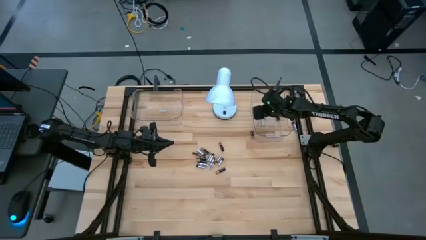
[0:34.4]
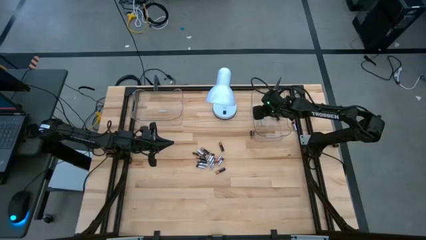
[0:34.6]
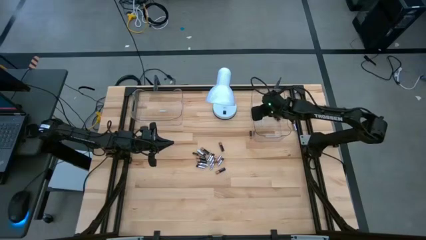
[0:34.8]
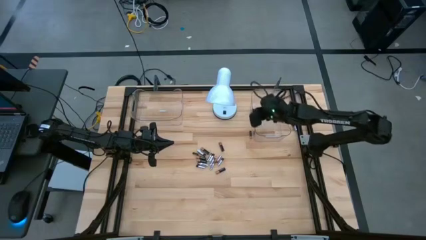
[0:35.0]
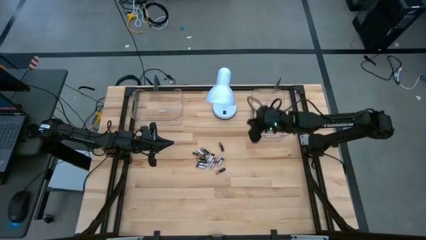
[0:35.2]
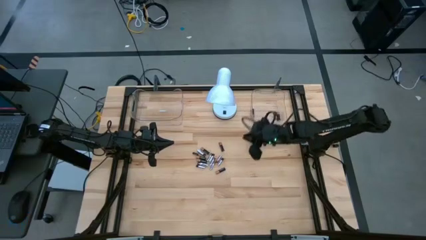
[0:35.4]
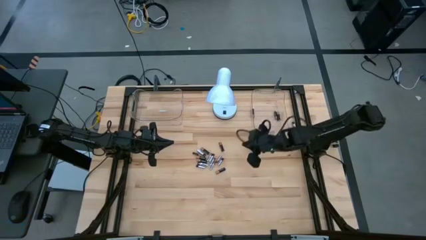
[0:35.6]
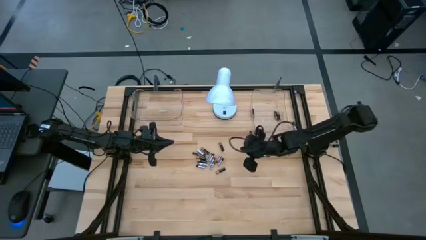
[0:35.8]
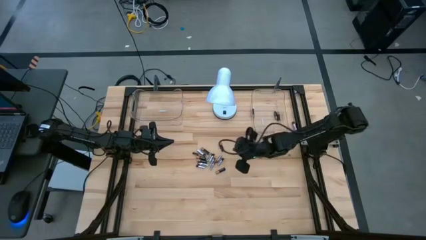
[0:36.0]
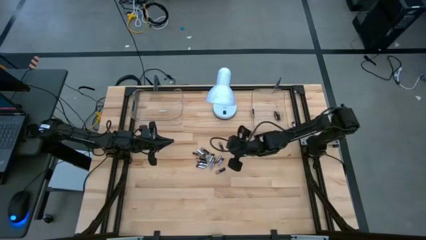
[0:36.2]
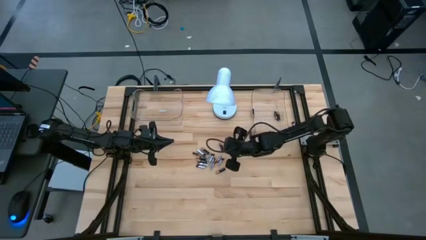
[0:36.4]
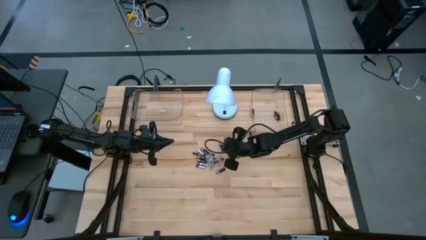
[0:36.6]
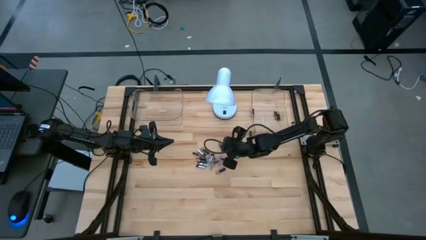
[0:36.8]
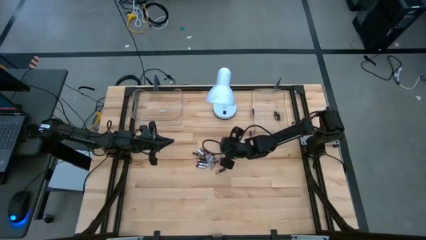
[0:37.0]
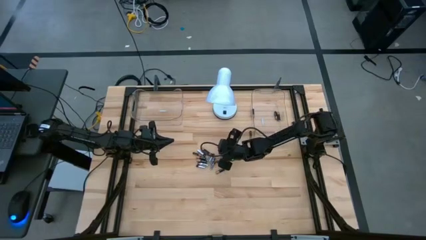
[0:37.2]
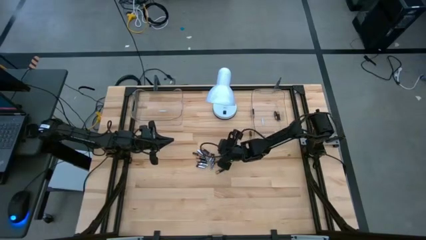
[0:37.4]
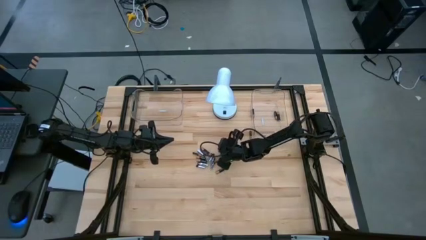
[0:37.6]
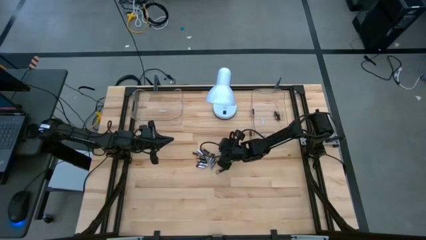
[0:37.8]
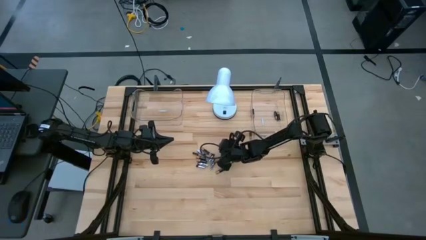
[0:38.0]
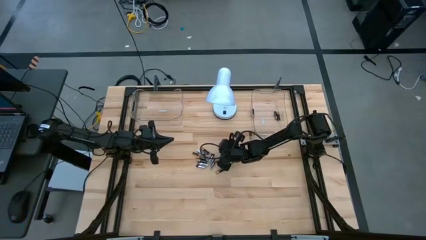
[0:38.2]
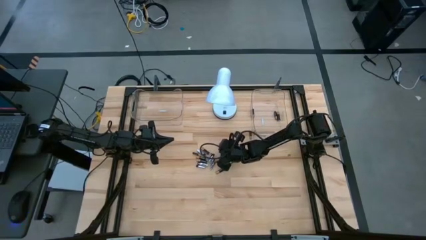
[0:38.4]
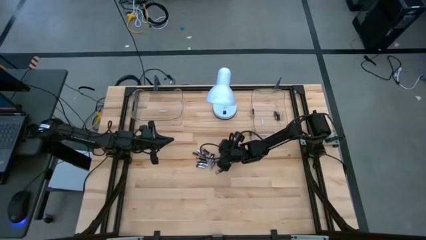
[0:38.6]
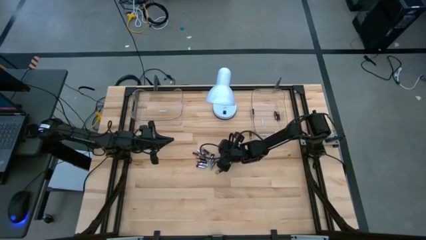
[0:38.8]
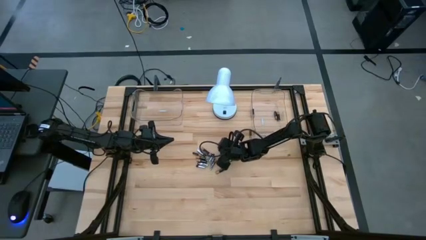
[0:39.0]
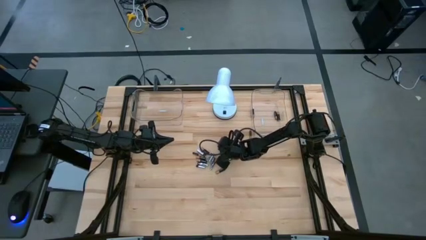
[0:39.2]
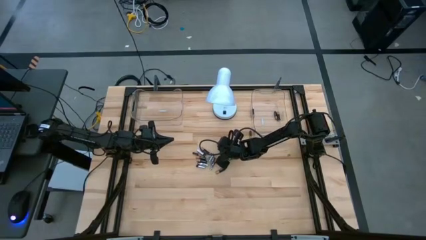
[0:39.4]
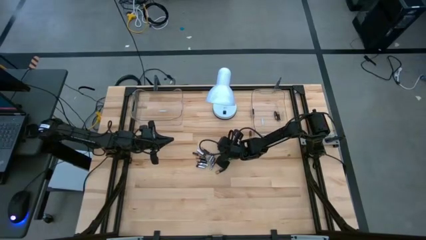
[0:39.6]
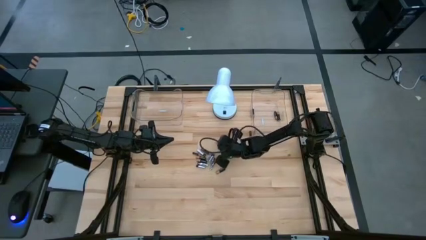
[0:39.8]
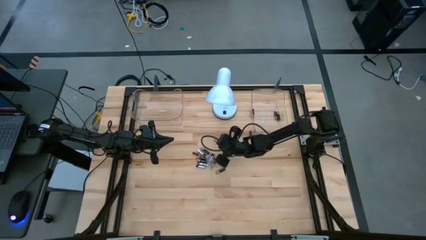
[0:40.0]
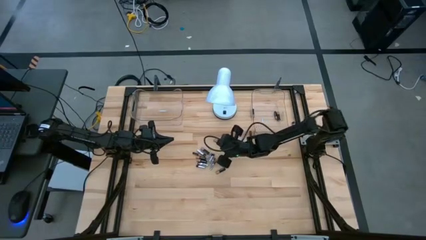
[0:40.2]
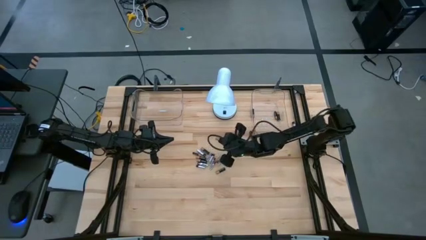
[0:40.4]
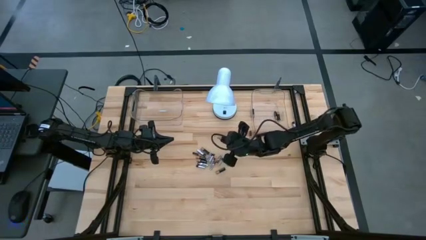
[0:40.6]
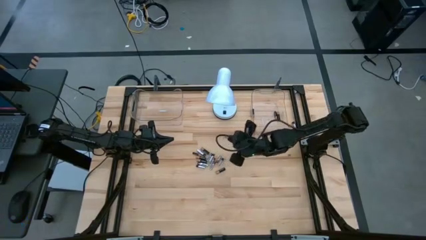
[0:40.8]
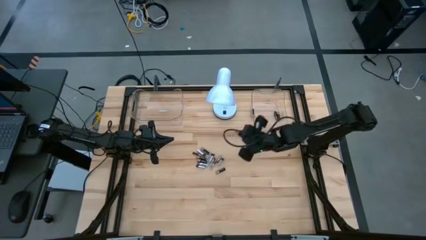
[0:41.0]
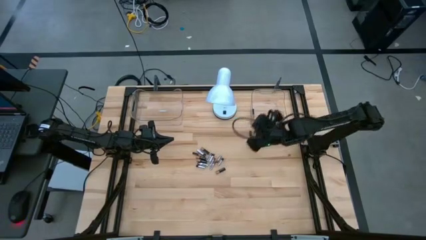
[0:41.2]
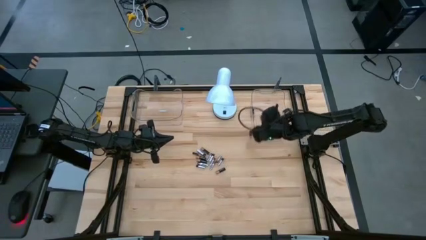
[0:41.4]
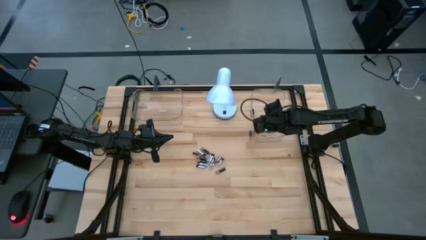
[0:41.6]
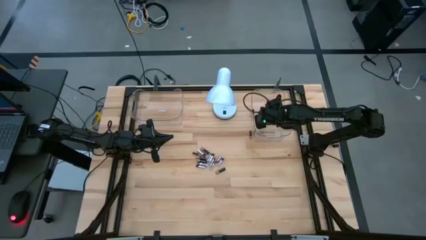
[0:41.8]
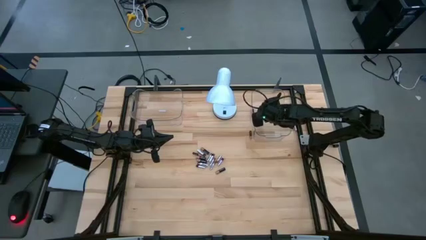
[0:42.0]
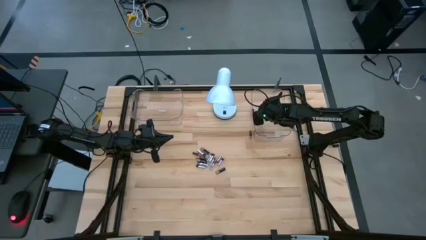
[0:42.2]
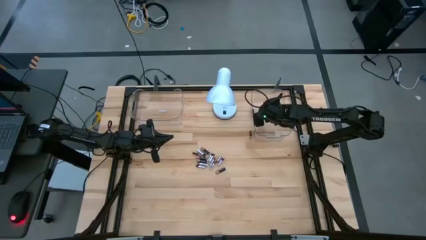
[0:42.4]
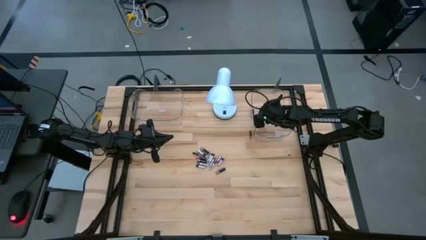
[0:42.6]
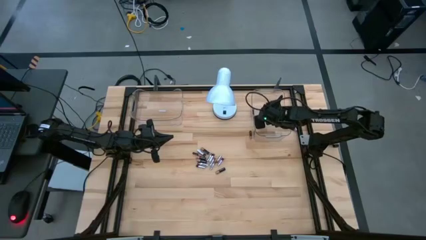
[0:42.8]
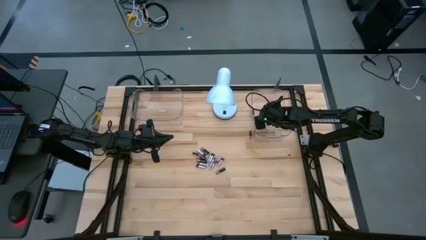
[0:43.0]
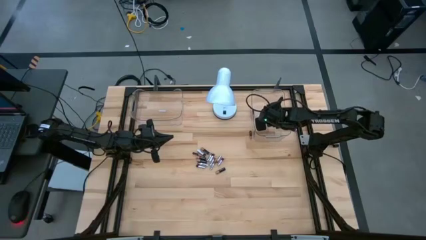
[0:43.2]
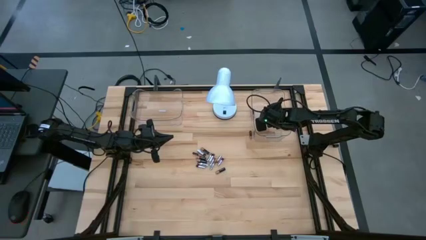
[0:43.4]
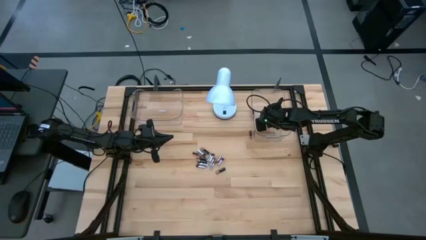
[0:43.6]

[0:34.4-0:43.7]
Task: Sort batteries
Put the black battery in the transparent bin

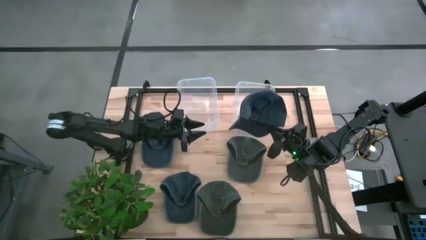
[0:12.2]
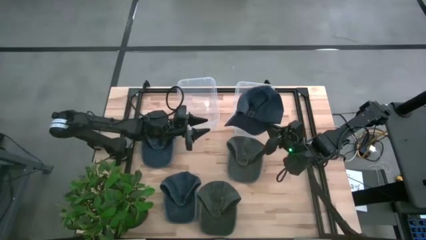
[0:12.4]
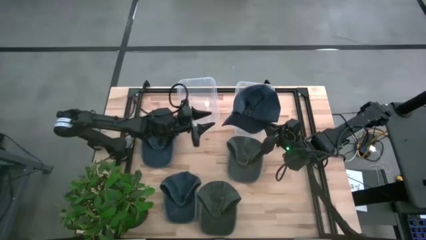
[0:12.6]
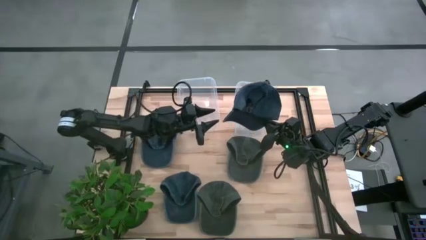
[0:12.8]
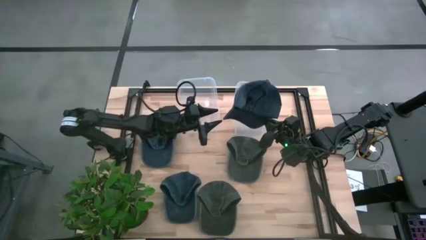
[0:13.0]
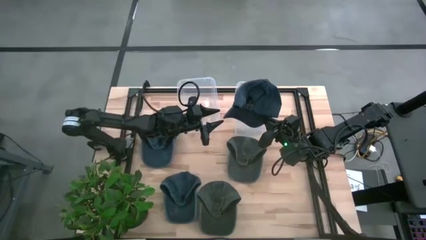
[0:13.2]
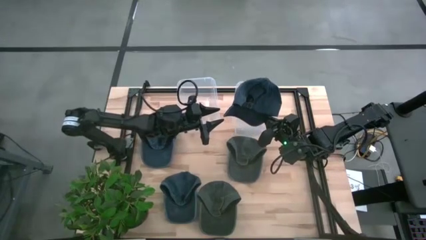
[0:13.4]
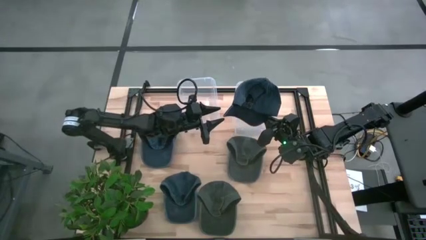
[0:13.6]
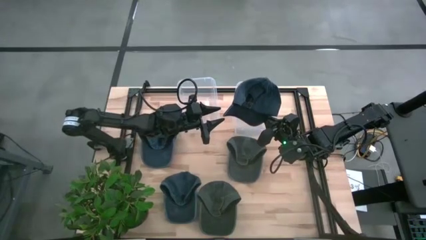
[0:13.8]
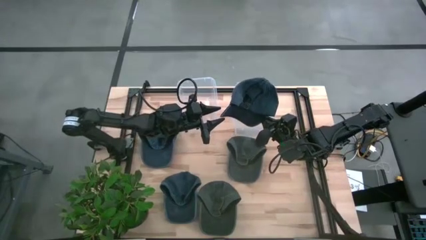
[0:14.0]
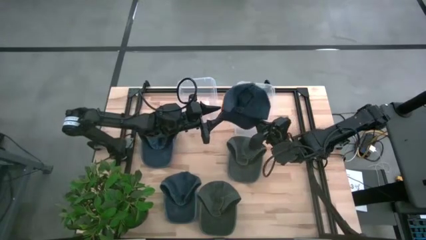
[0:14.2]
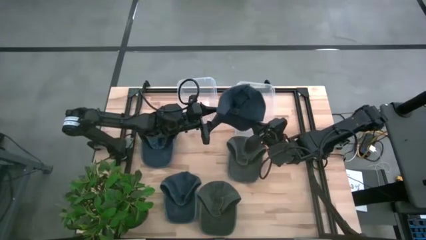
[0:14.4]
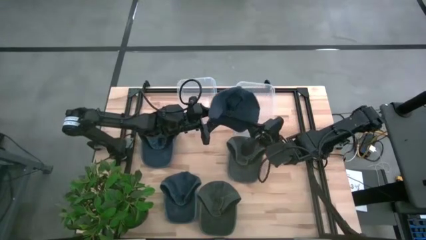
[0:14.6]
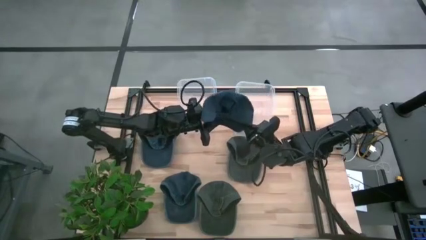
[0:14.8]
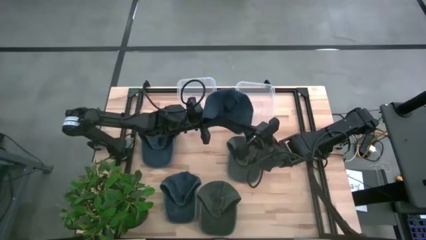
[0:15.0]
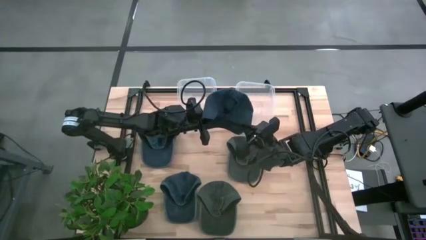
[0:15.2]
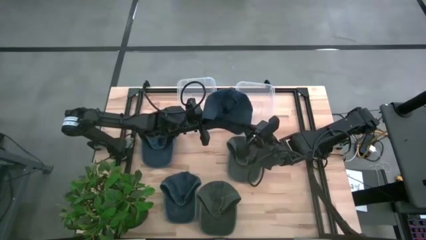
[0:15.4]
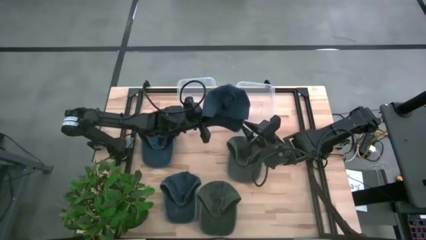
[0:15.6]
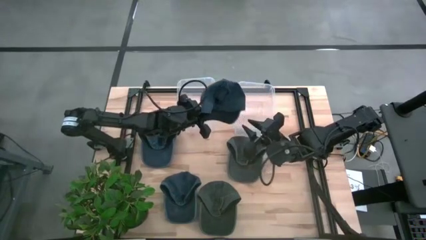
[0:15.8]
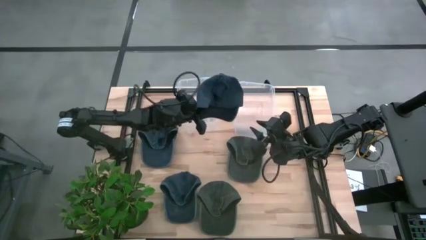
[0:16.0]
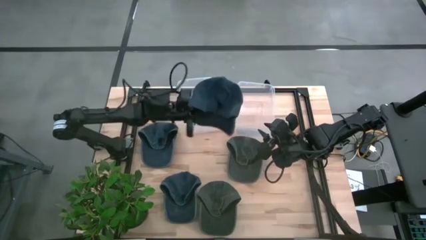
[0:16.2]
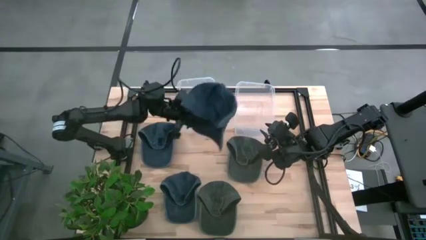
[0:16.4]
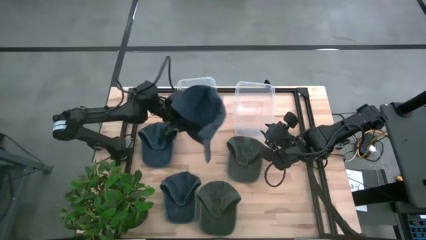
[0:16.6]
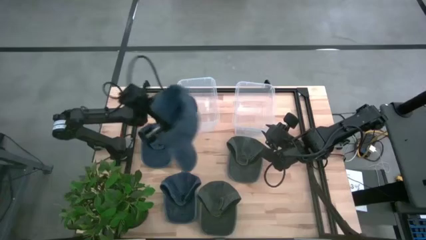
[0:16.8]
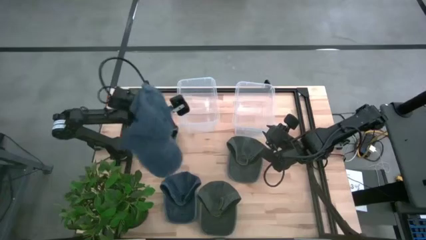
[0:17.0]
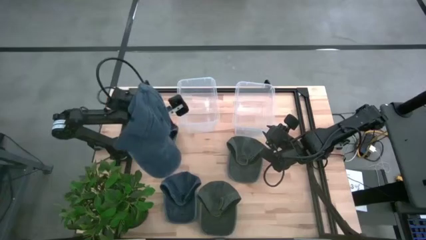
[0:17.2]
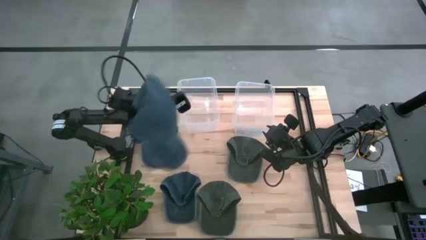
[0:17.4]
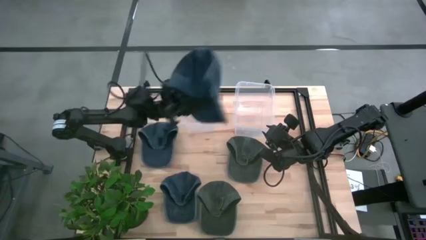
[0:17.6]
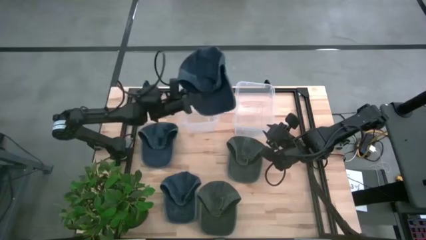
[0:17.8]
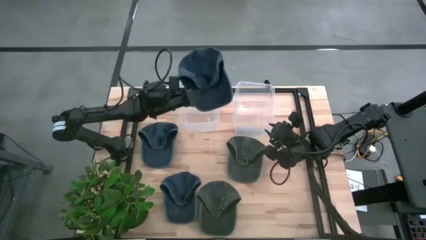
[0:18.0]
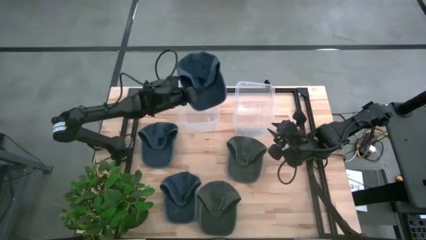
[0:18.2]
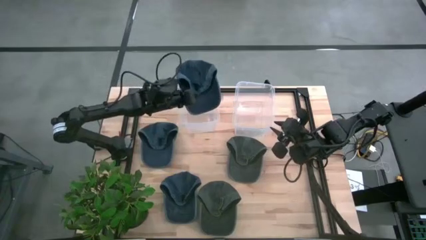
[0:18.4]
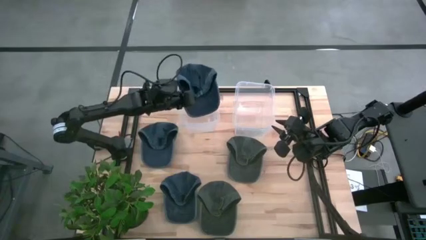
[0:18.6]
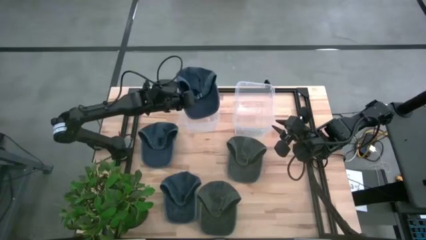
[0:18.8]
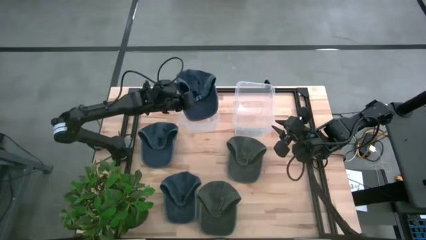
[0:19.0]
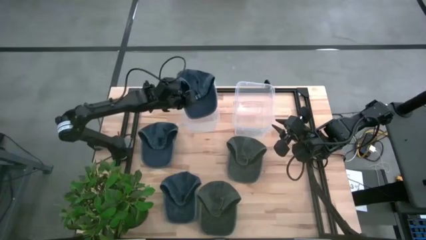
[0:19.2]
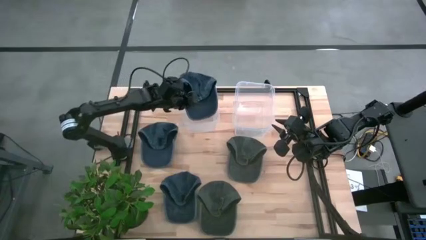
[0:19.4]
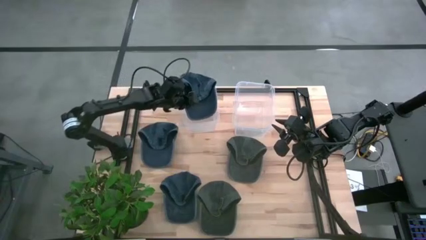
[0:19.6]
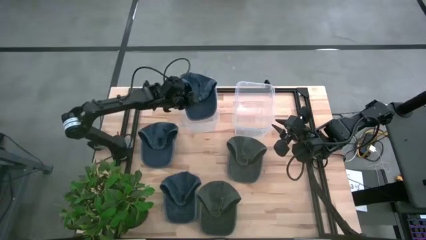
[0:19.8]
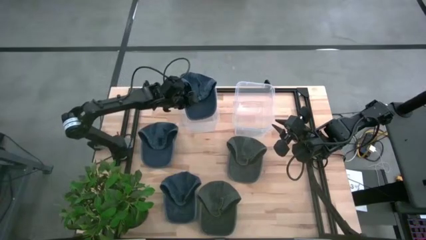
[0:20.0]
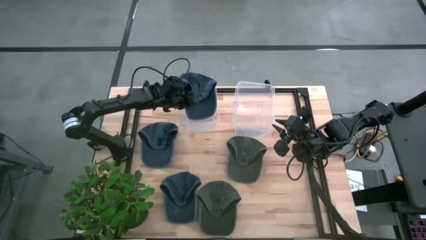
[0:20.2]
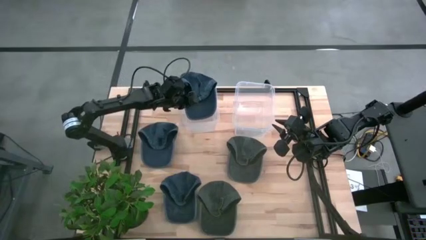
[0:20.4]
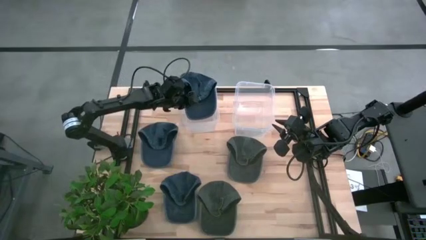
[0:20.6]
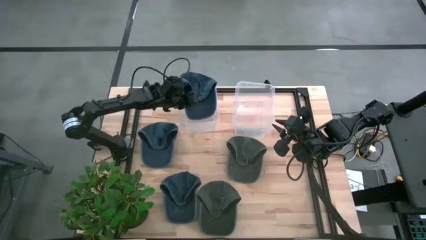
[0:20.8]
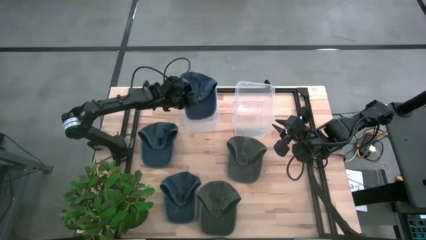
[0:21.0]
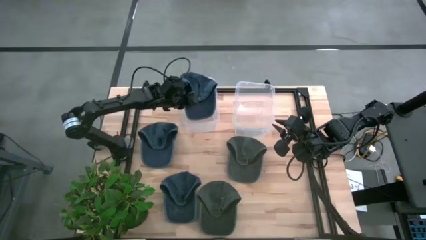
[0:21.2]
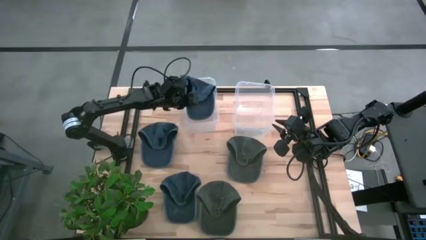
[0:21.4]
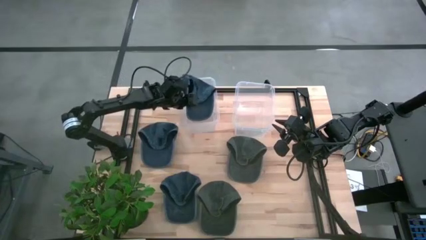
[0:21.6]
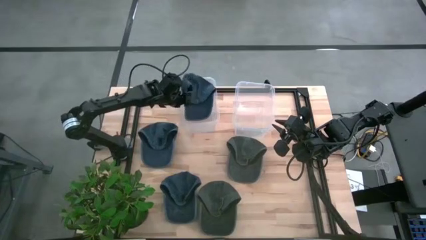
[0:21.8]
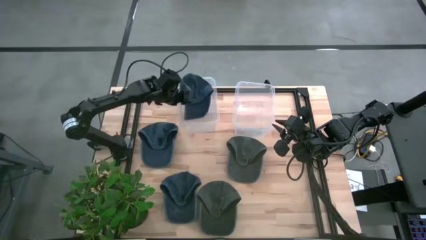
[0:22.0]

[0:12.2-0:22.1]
Task: Pick & Place hat
Put the bottom right blue cap into the left transparent bin
